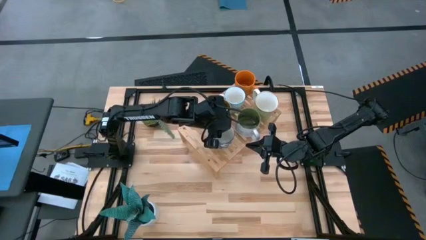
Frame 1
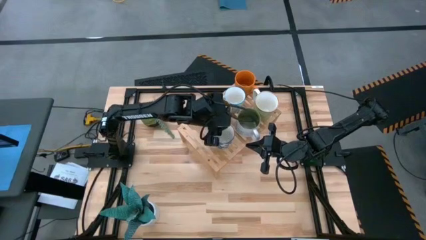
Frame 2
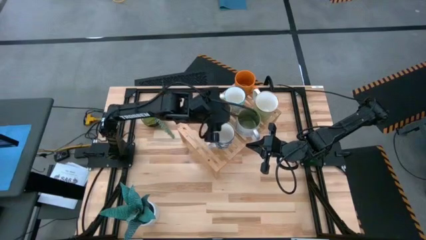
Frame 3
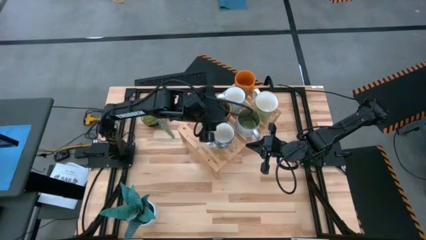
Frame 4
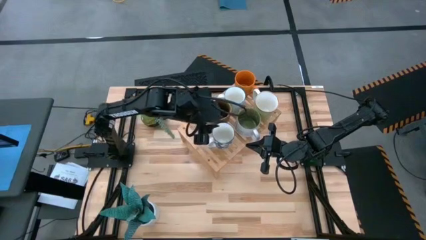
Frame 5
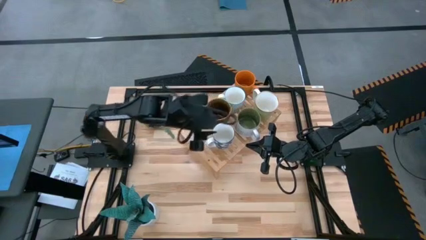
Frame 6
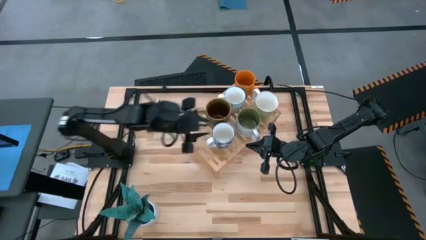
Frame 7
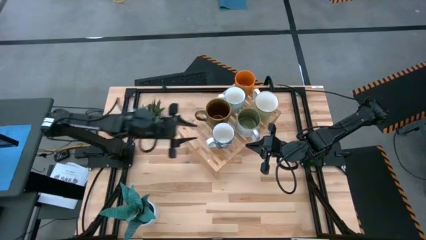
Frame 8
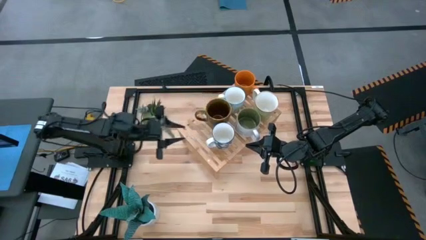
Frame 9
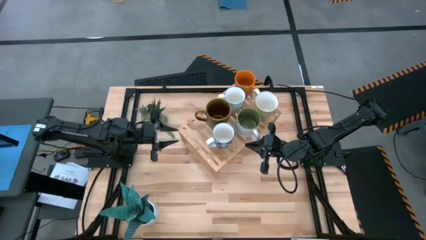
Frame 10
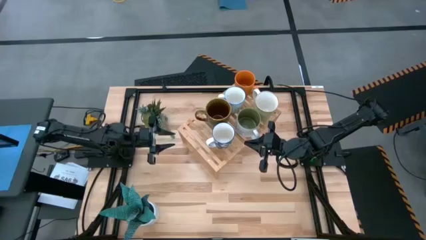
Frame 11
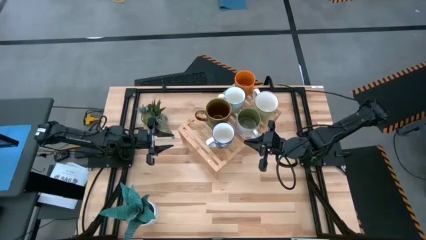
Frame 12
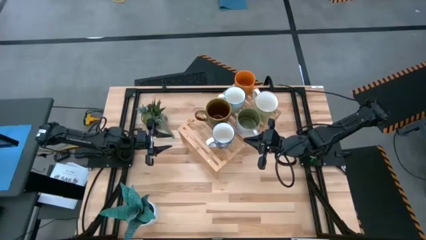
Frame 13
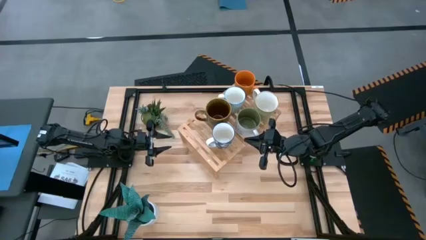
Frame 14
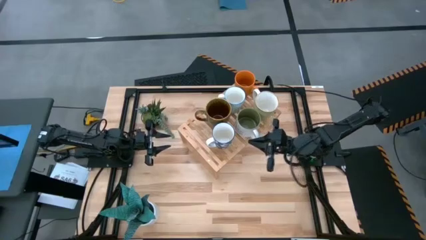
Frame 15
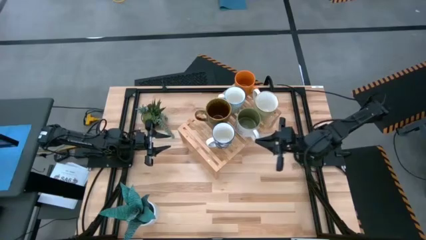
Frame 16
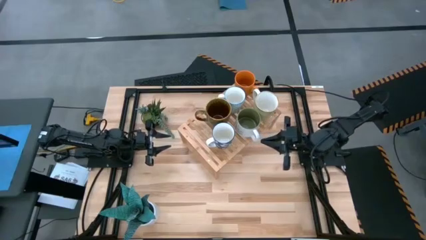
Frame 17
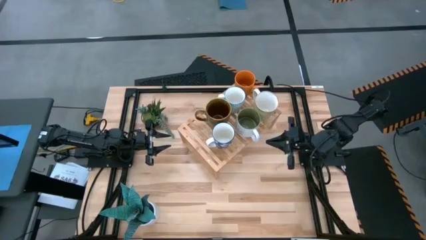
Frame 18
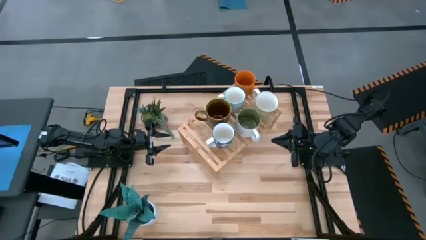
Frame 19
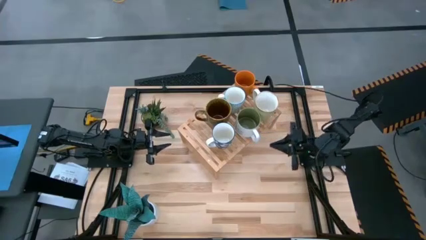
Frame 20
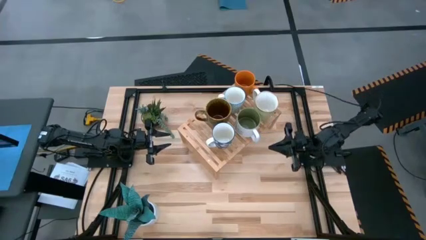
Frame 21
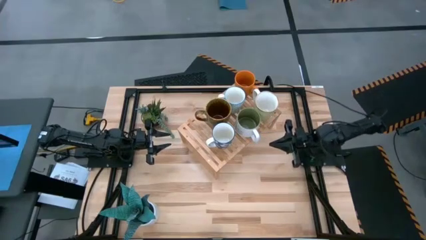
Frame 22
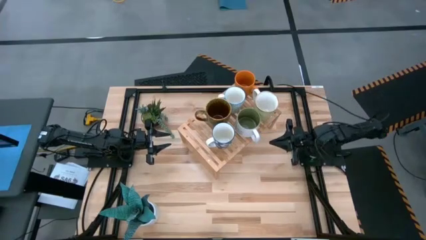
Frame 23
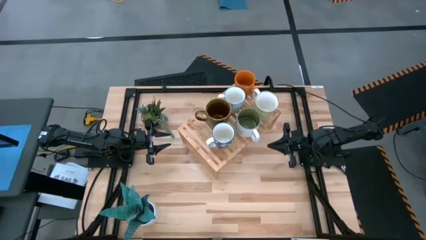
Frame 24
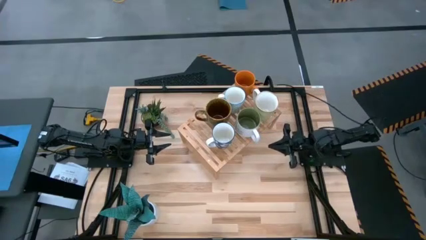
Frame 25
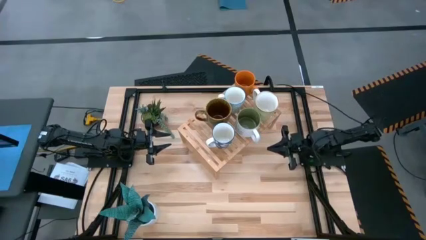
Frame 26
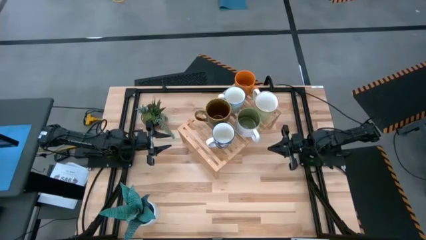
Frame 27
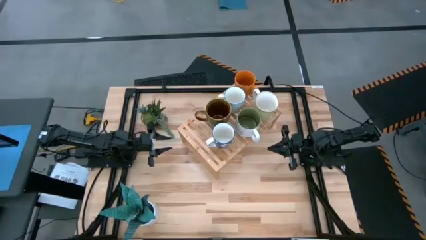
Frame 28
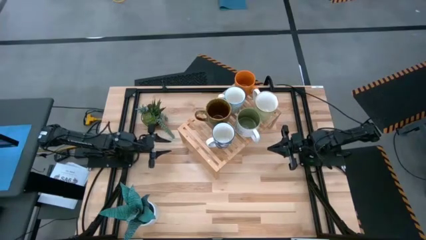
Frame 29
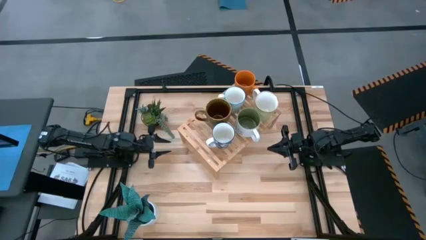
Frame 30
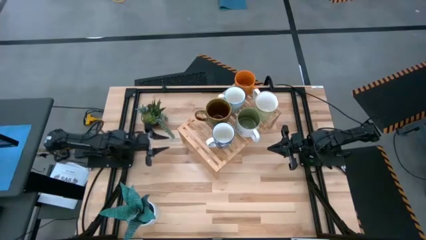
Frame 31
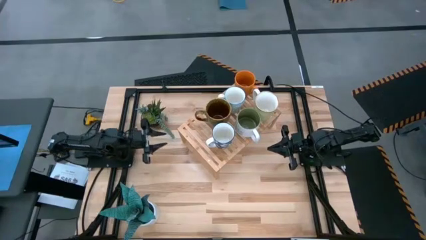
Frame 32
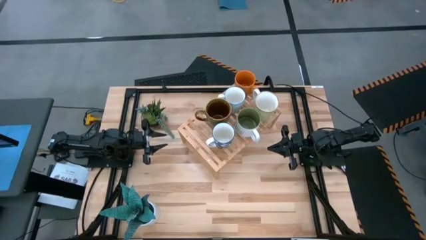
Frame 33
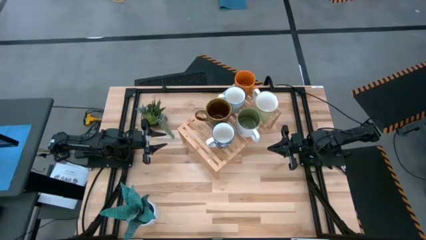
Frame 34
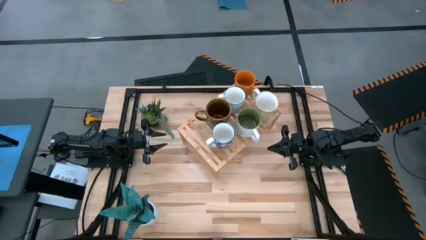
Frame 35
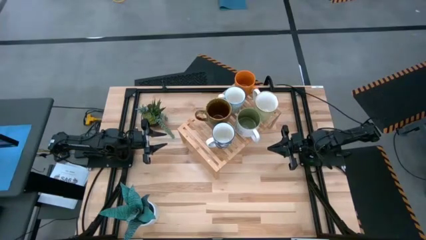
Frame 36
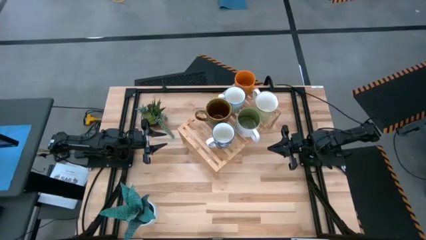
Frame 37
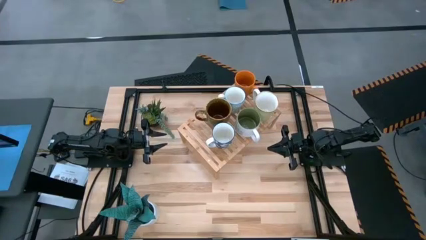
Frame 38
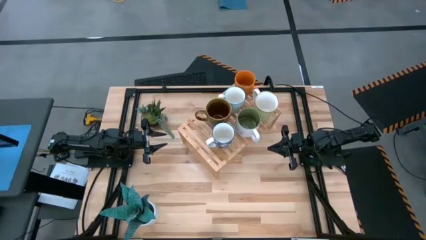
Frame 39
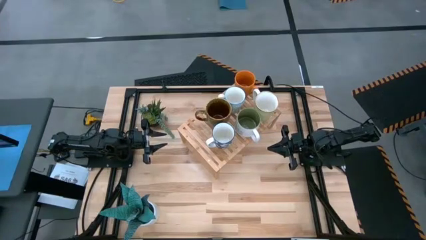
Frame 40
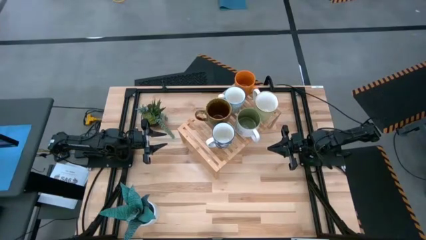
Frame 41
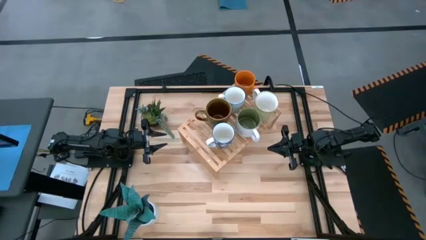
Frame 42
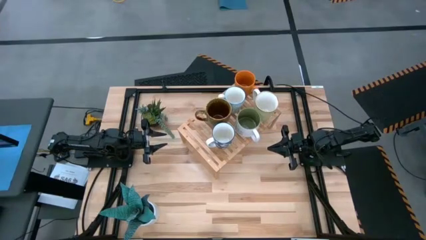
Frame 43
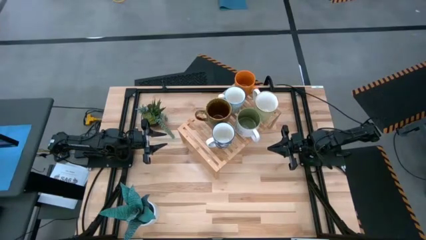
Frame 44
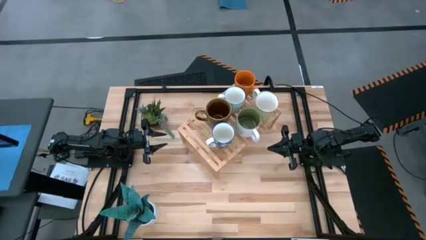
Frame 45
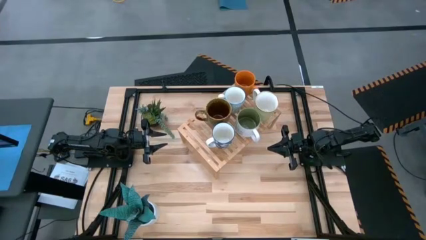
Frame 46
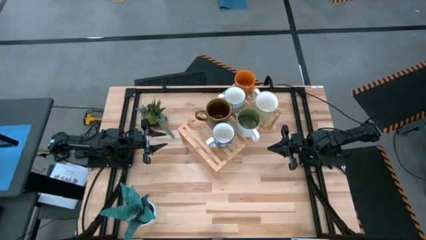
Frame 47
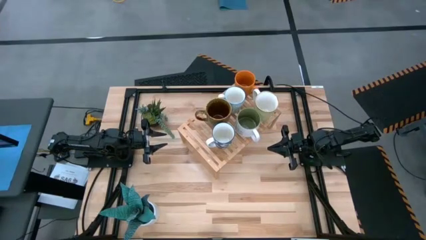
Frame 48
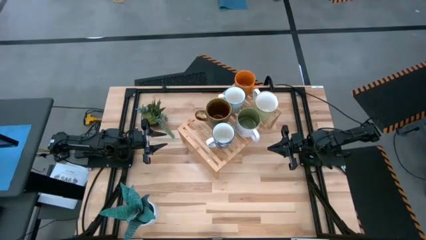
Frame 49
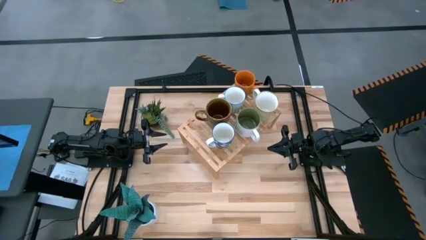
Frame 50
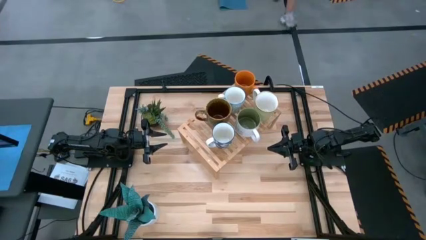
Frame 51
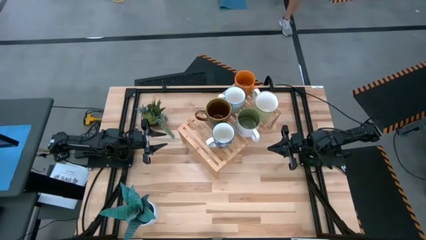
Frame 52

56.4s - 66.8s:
Task: Place coffee mugs
Return to Home Position

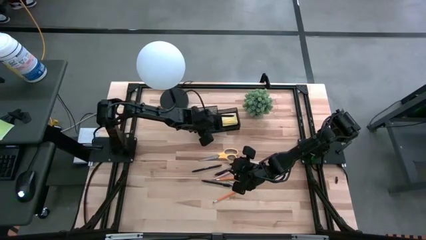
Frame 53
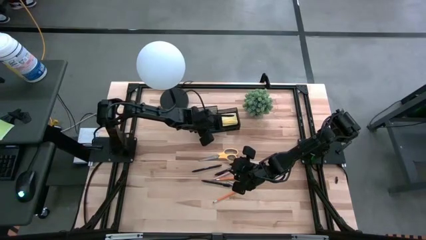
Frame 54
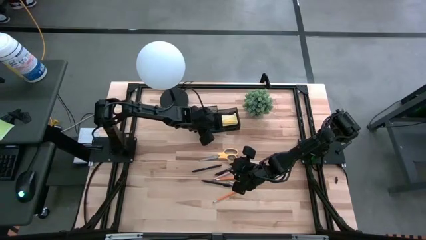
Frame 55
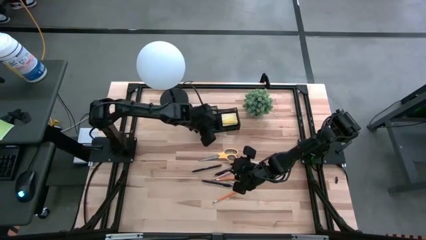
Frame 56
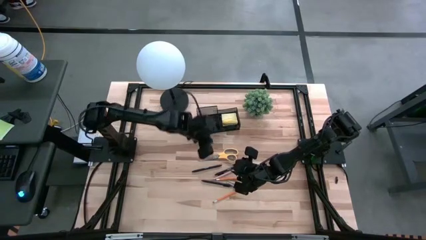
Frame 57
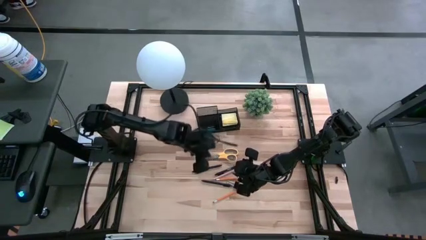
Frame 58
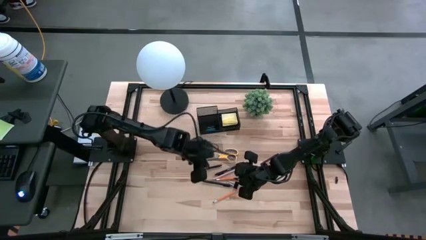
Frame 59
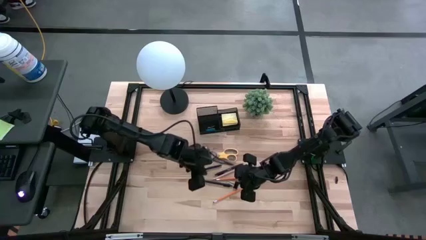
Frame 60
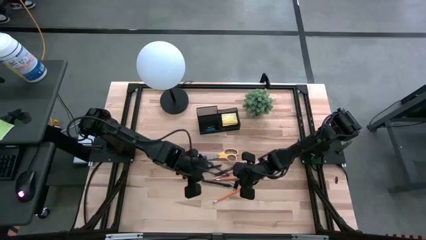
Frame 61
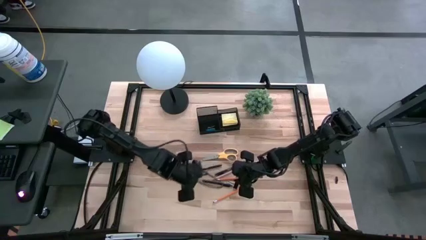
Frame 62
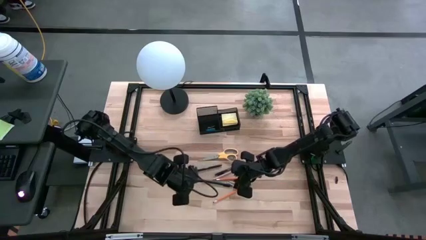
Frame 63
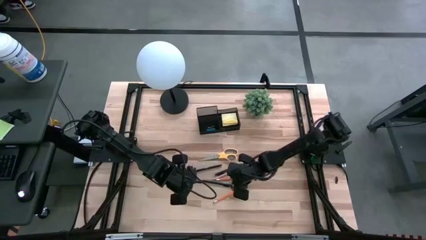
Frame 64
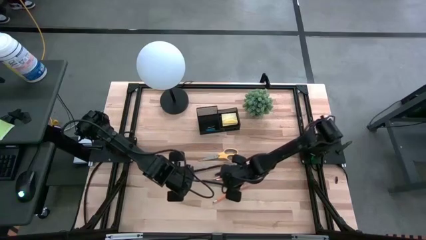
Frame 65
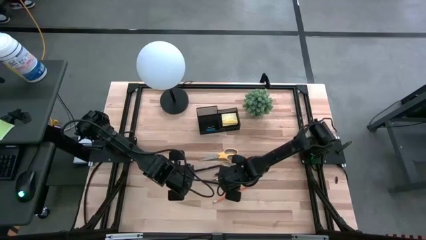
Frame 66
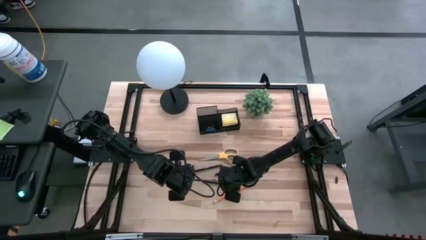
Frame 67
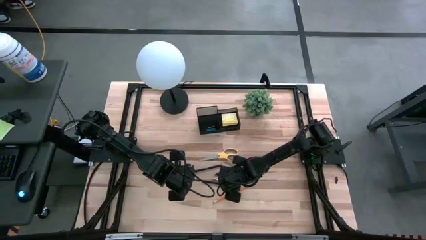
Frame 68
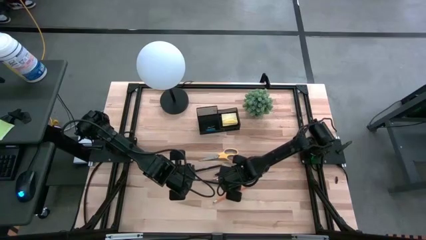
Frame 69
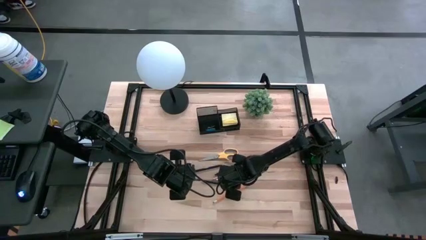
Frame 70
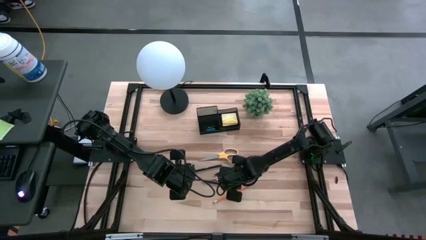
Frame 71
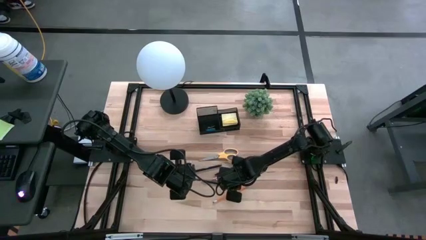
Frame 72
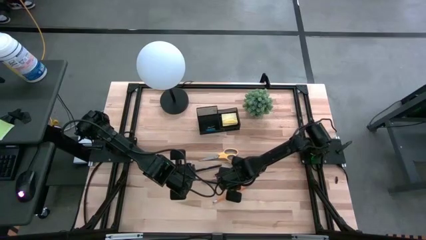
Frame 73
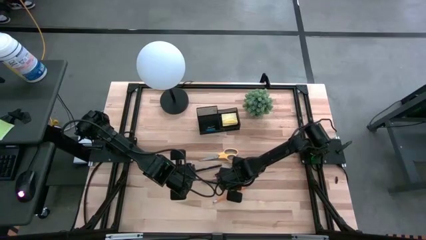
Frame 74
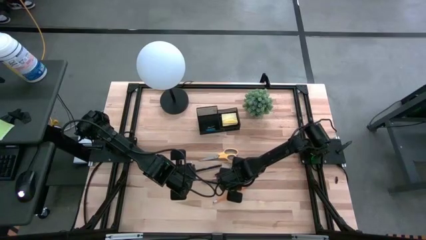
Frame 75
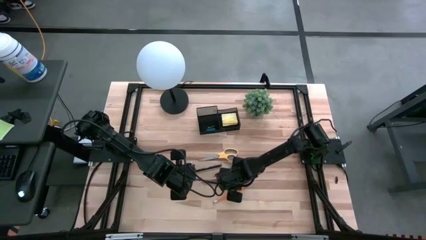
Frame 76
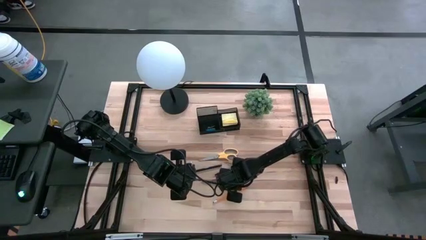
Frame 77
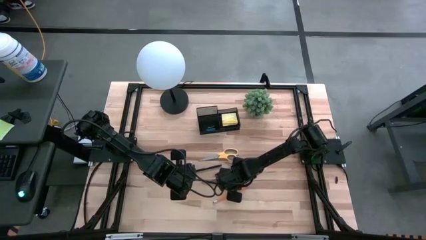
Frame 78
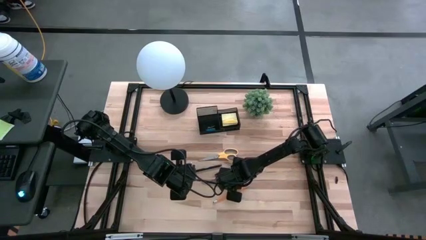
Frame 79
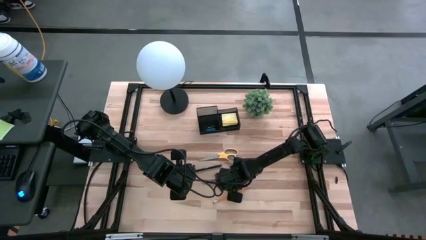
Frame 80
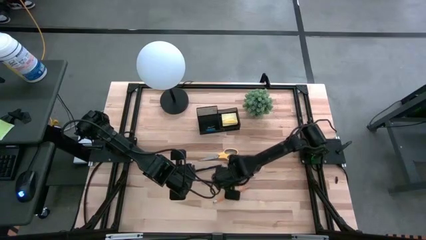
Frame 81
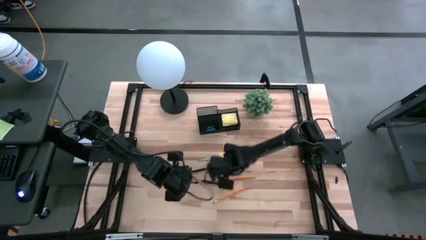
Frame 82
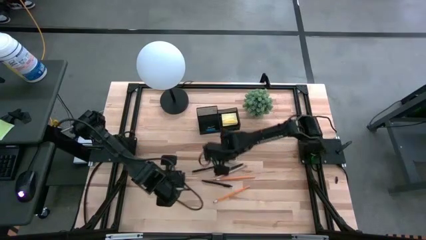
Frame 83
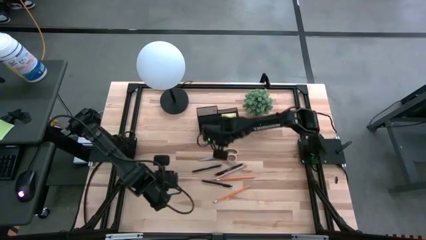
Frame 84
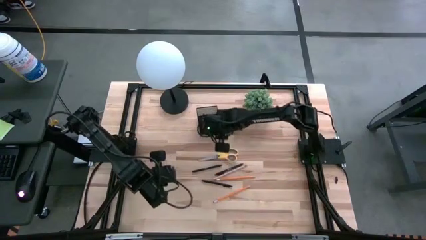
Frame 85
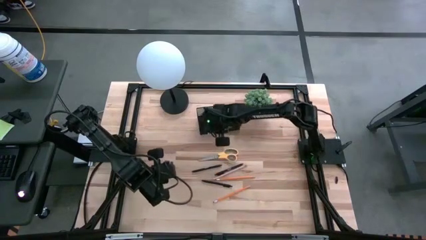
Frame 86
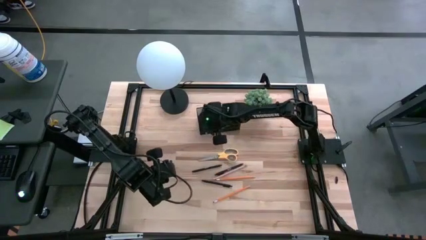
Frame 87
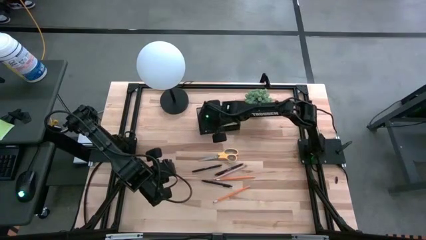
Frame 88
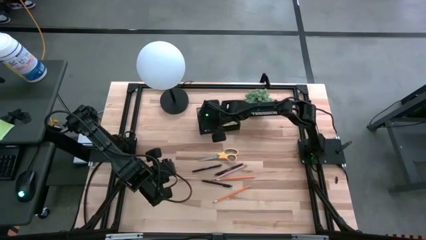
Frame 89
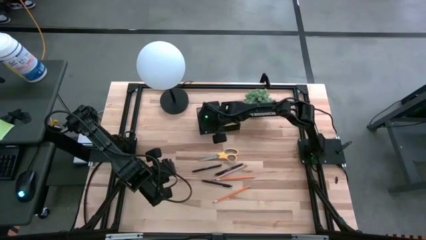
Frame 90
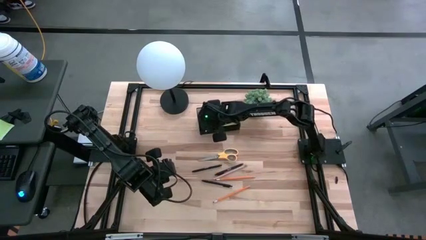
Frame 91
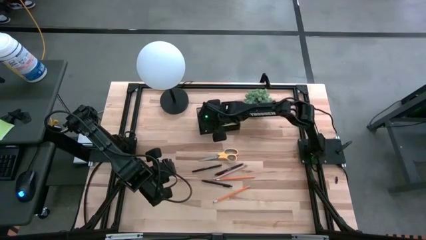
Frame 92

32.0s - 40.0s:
Task: Pick and place office supplies into organizer
Put the black binder clip into the desk organizer
